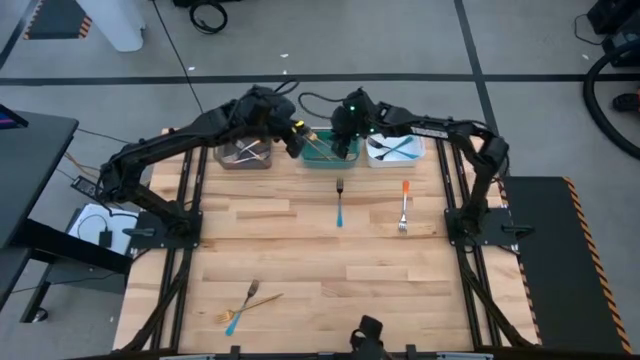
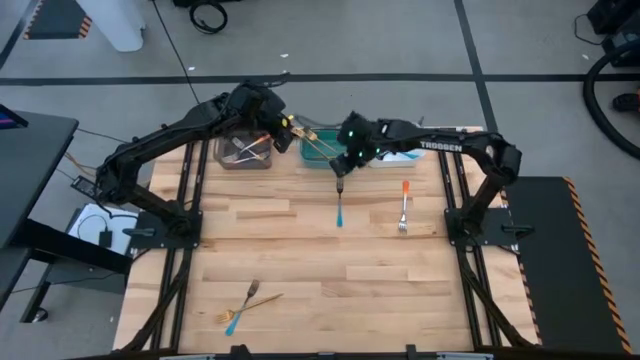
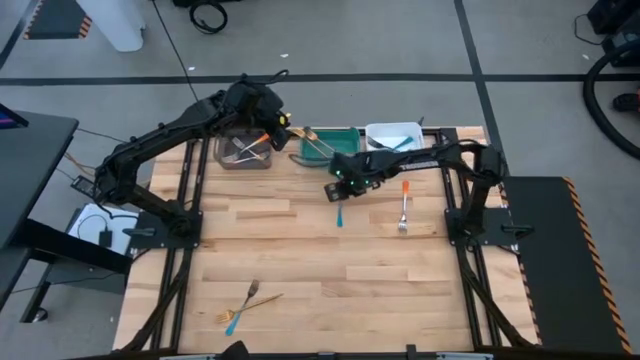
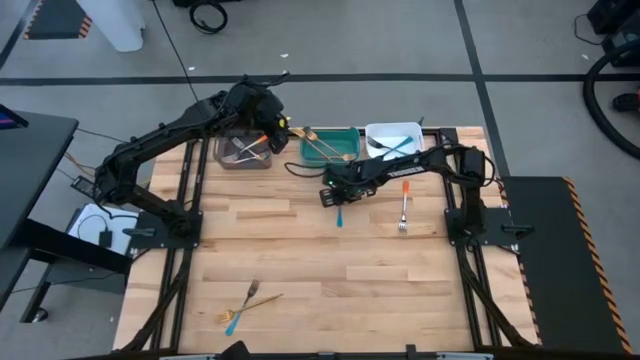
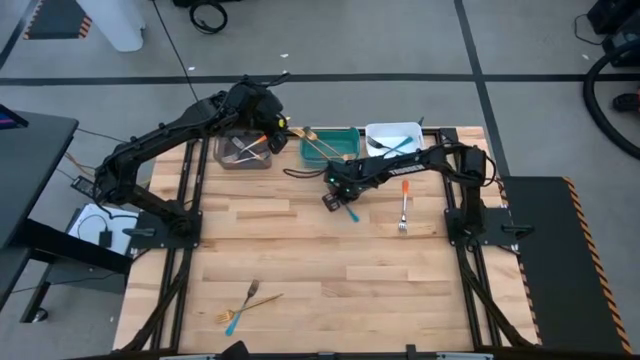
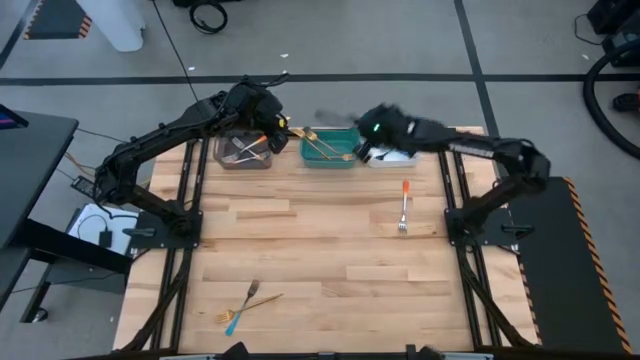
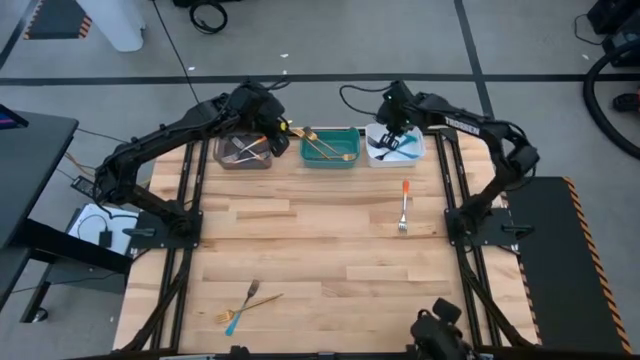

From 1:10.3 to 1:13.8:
Task: Sort silverware by color (type)
Put the blue fork into the white bin

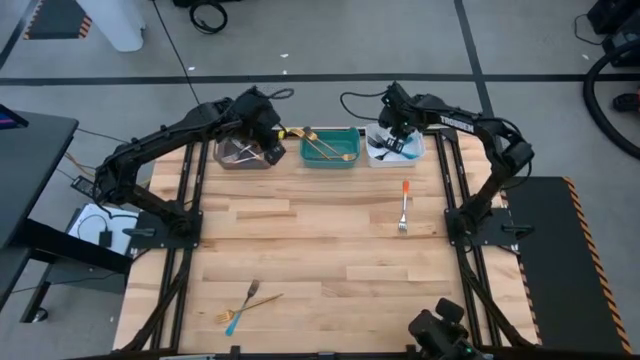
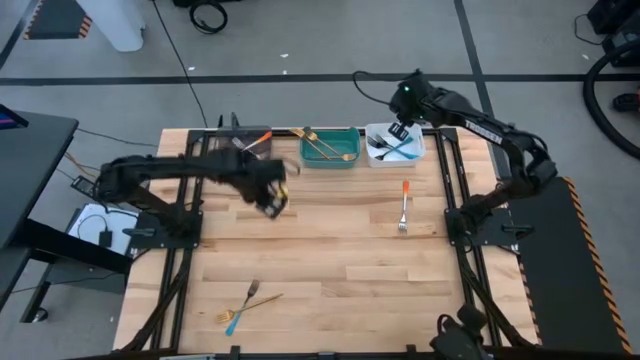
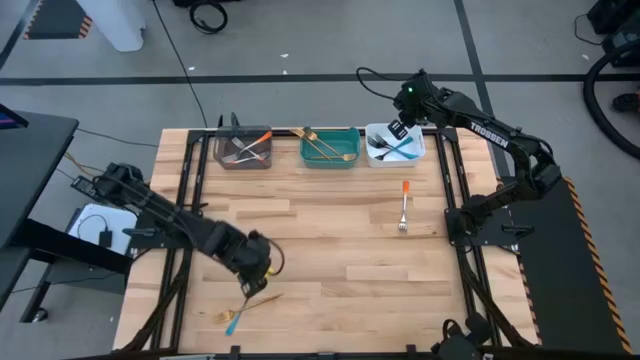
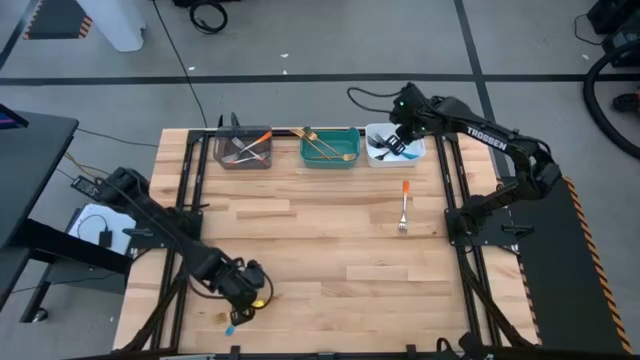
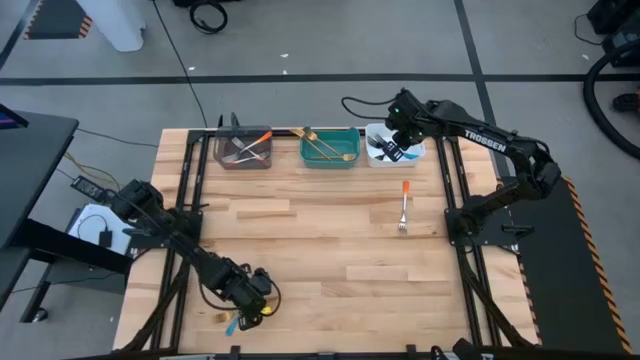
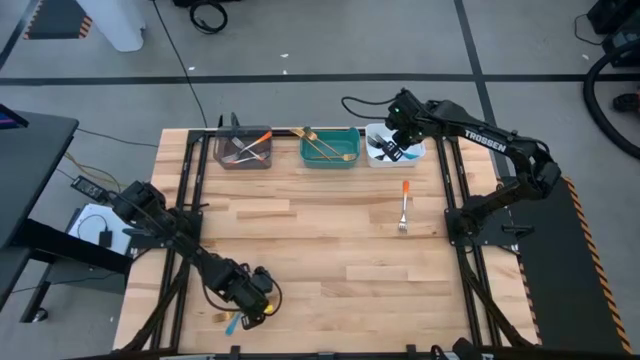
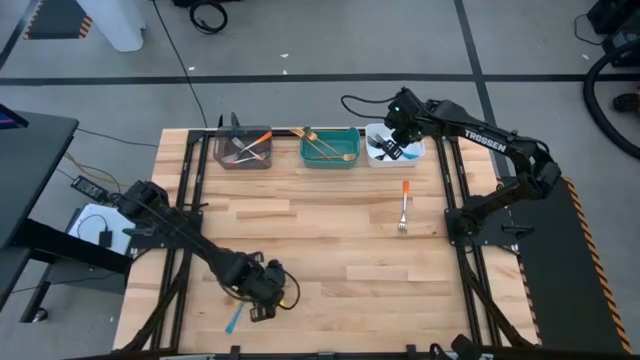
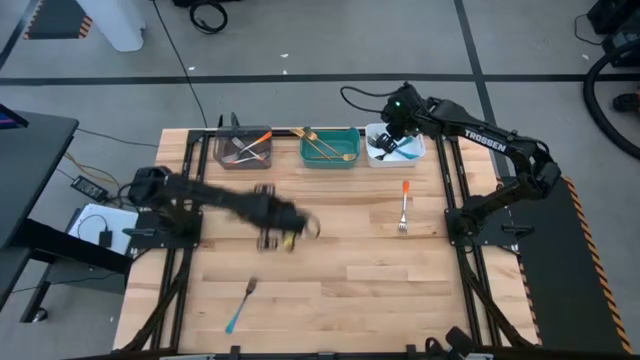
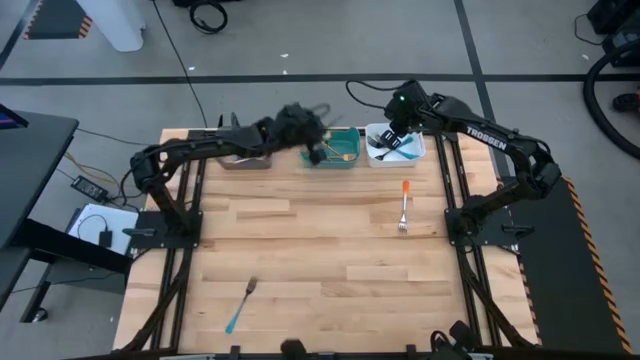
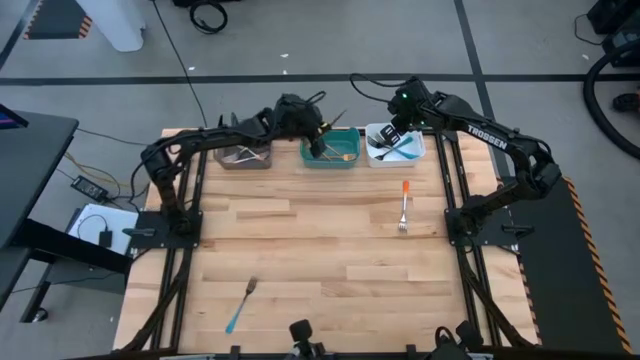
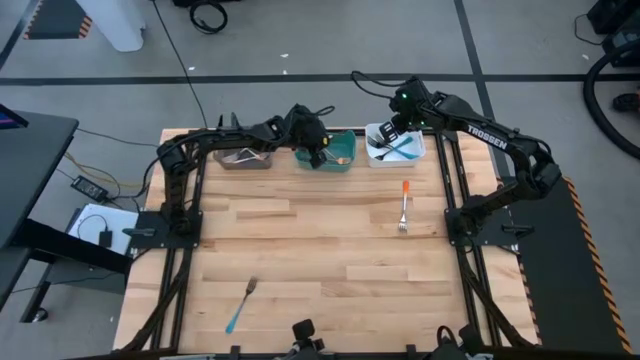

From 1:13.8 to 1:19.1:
Put the gold fork into the green bin

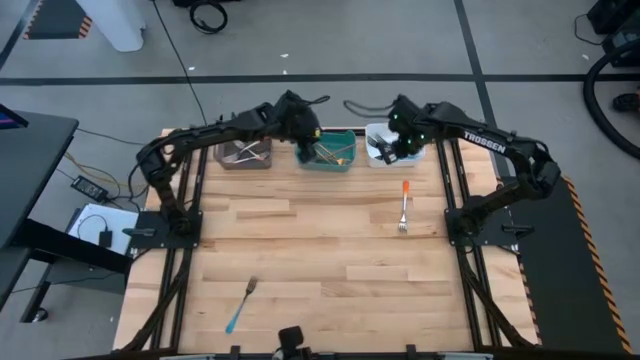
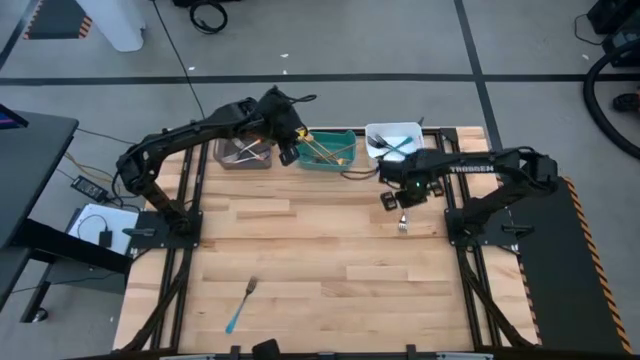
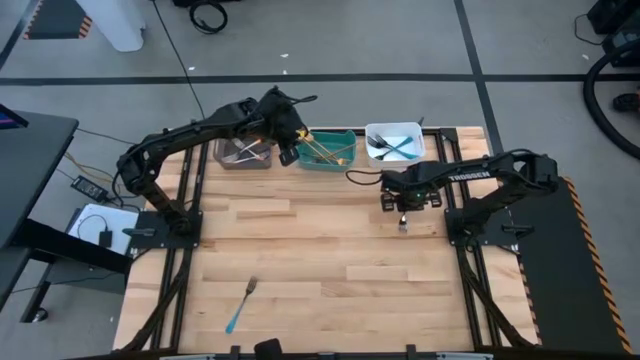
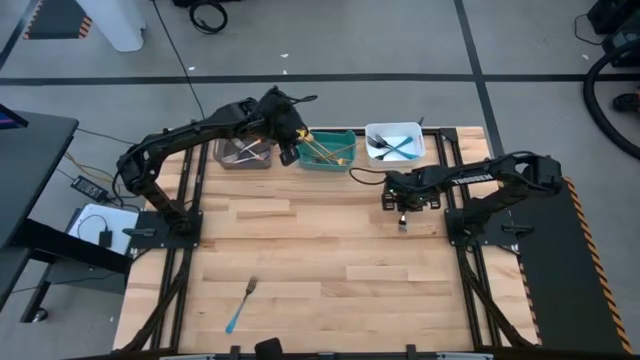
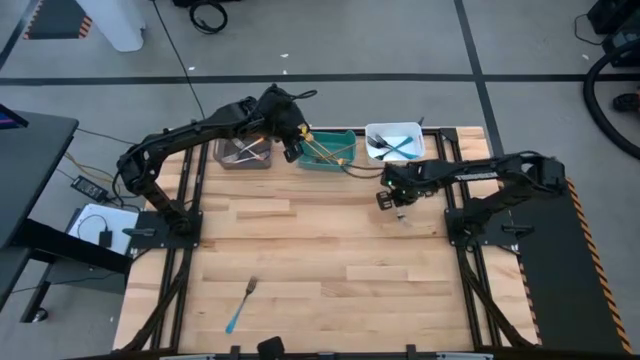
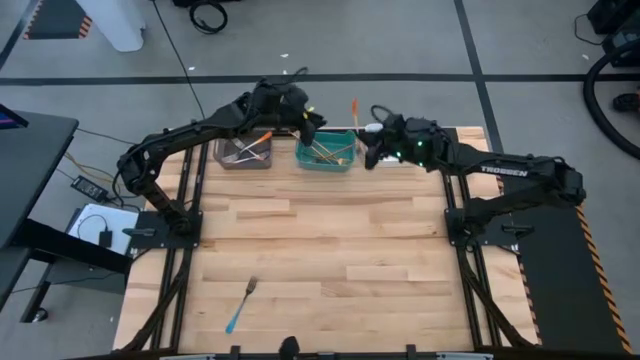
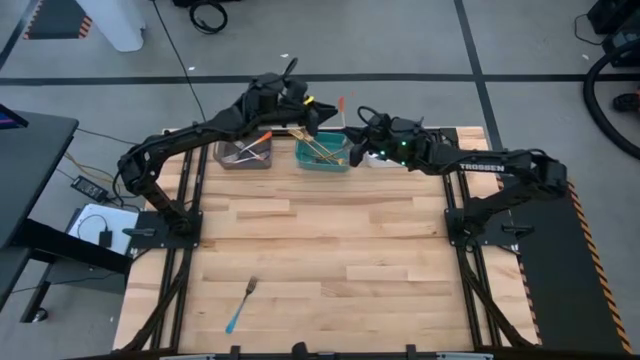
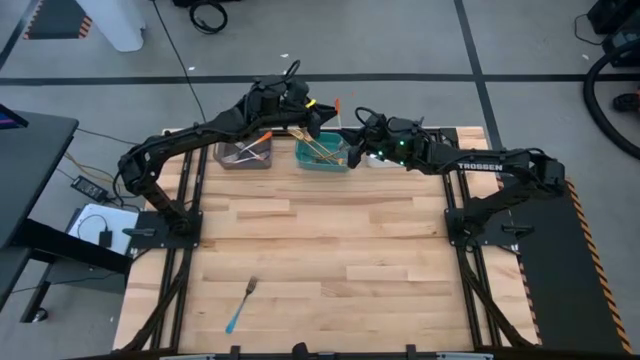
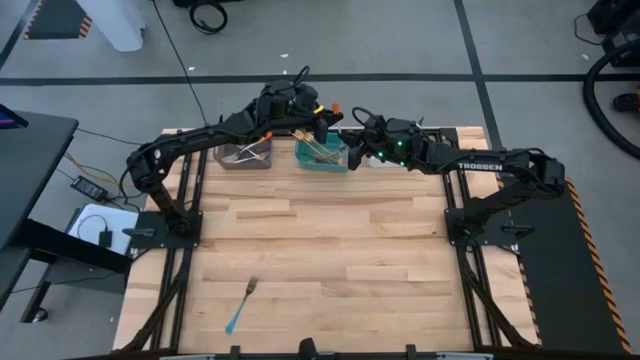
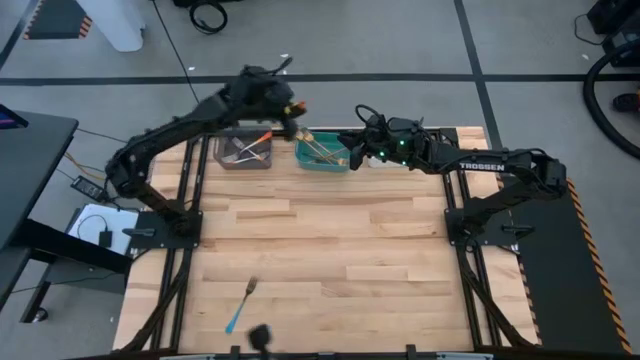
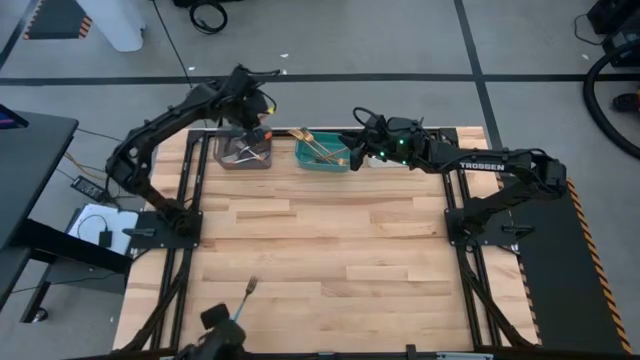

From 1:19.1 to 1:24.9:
Put the orange fork into the black bin

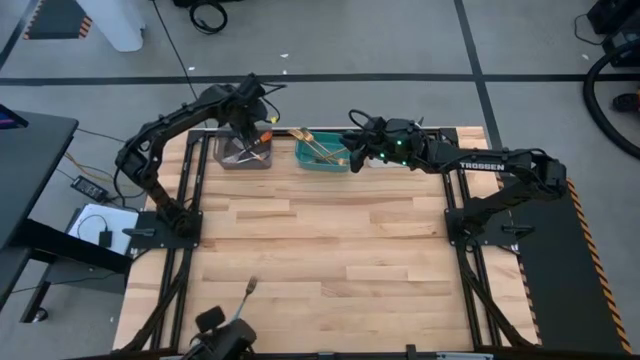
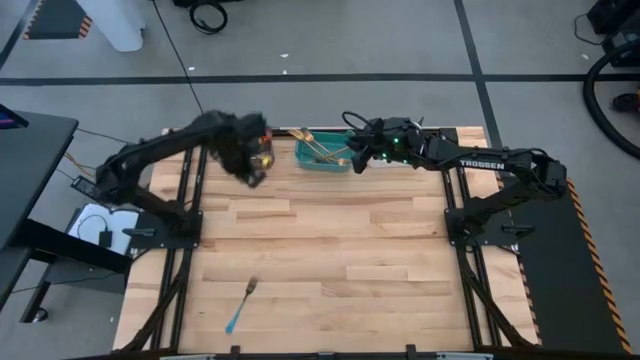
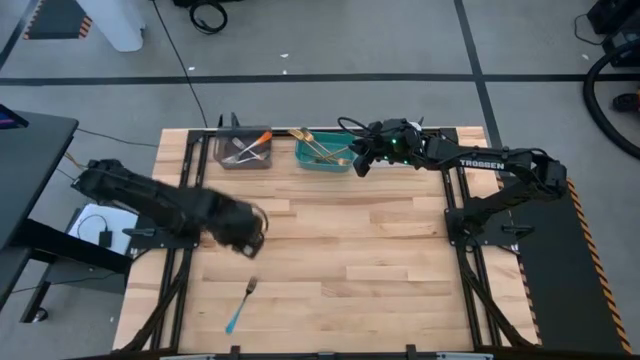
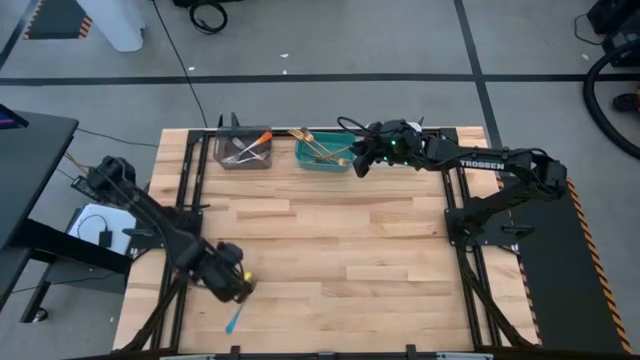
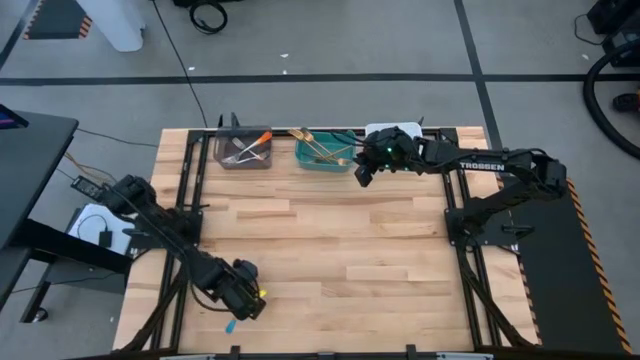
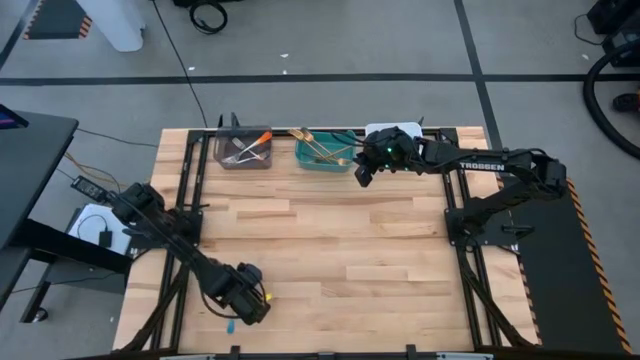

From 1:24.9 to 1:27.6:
Put the blue fork into the white bin

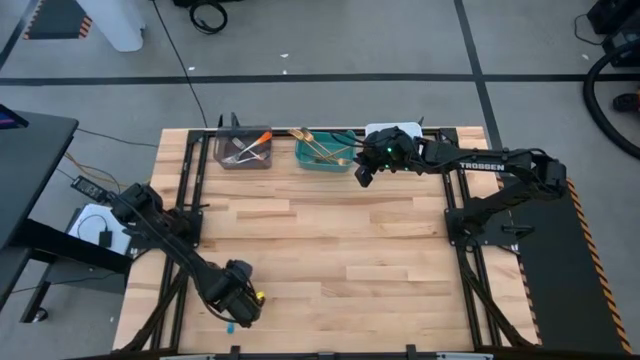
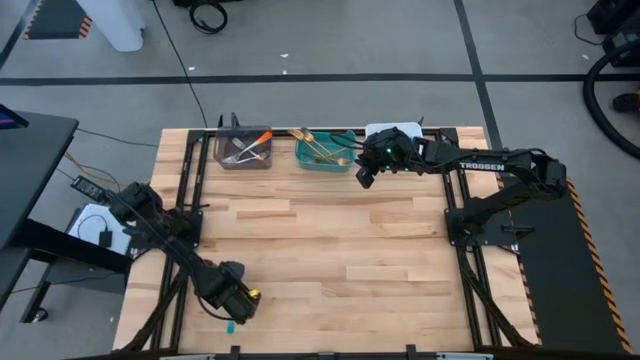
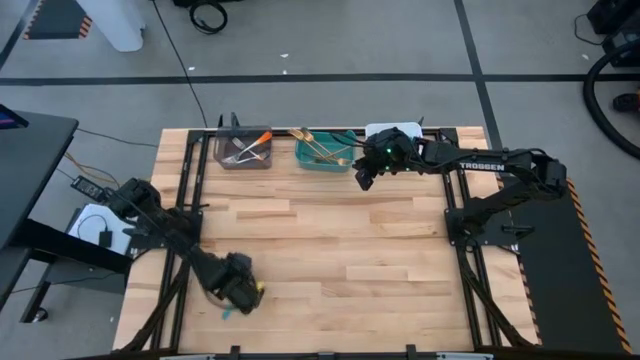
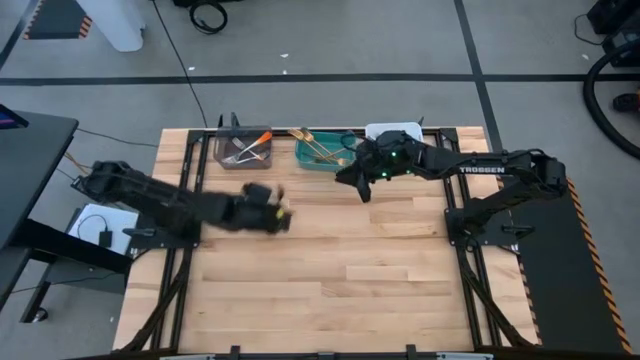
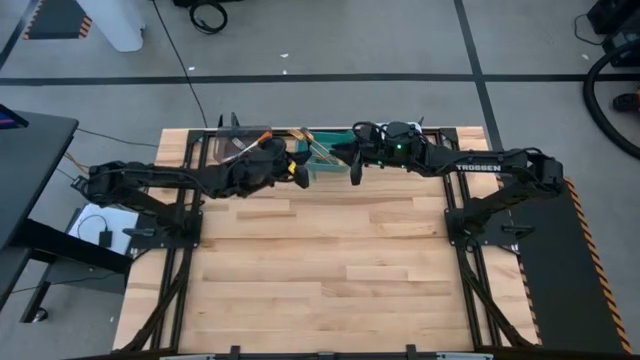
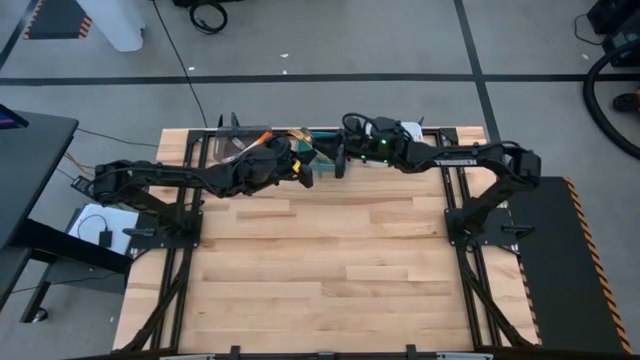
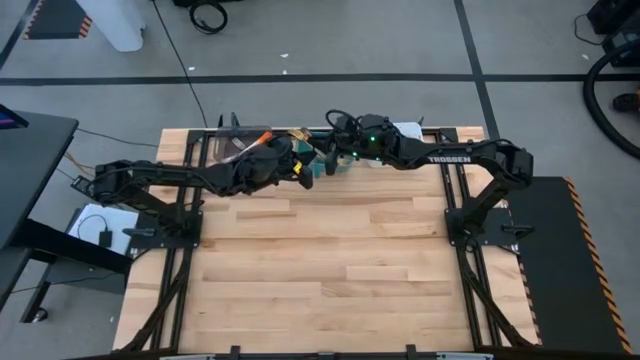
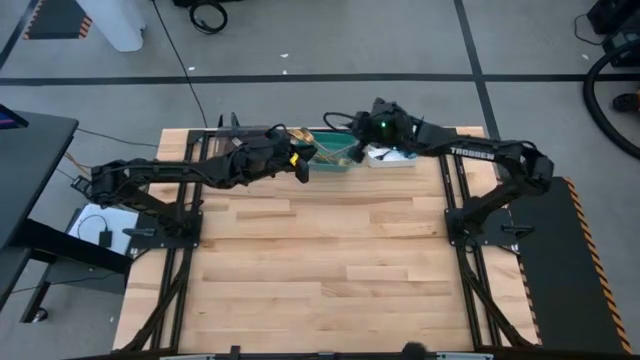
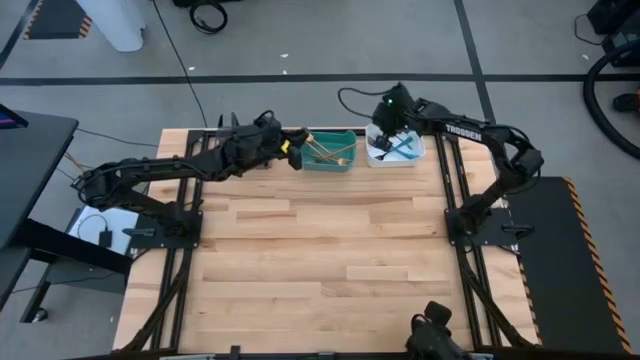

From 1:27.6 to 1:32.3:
Put the blue fork into the white bin
